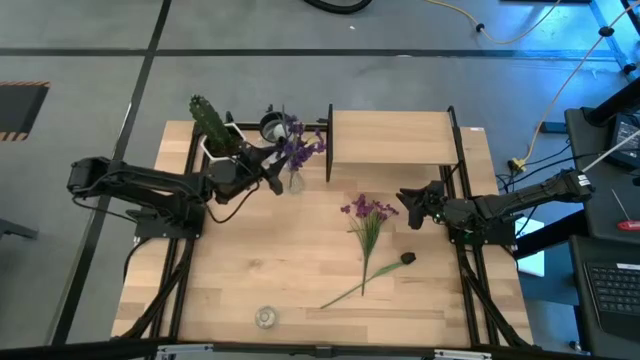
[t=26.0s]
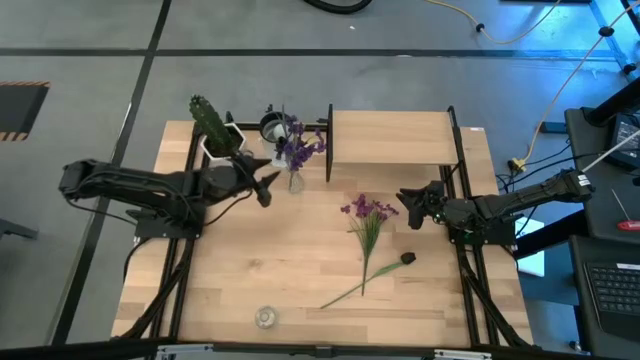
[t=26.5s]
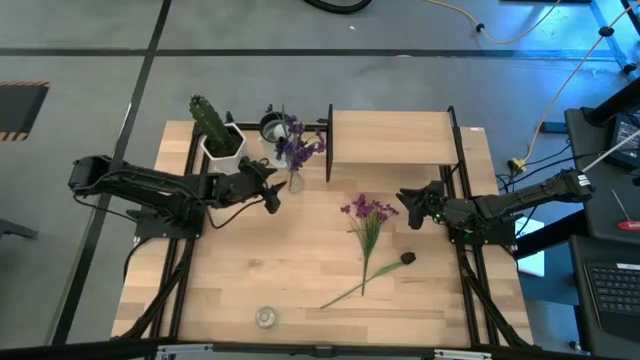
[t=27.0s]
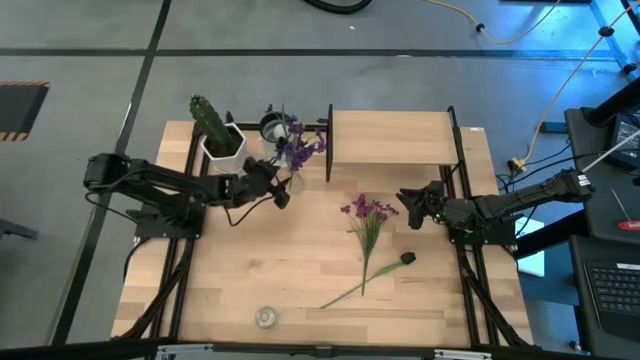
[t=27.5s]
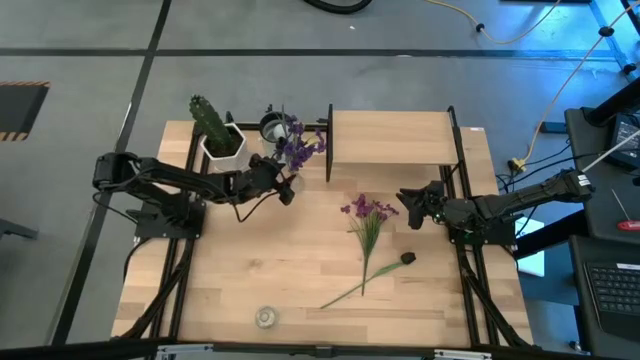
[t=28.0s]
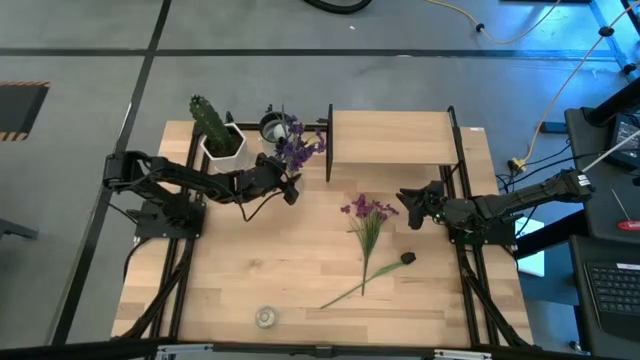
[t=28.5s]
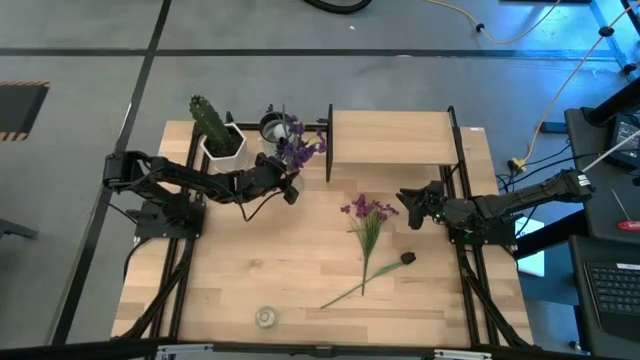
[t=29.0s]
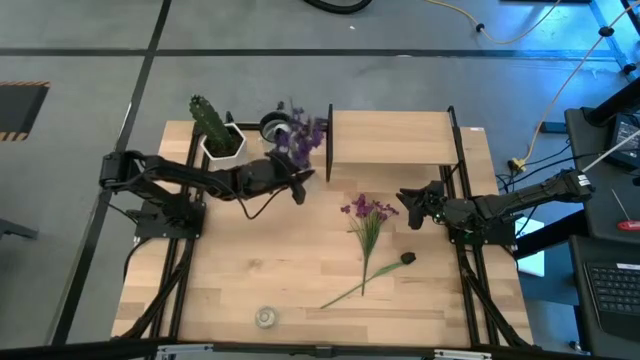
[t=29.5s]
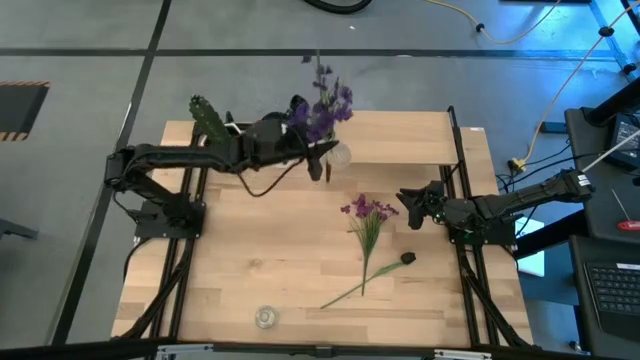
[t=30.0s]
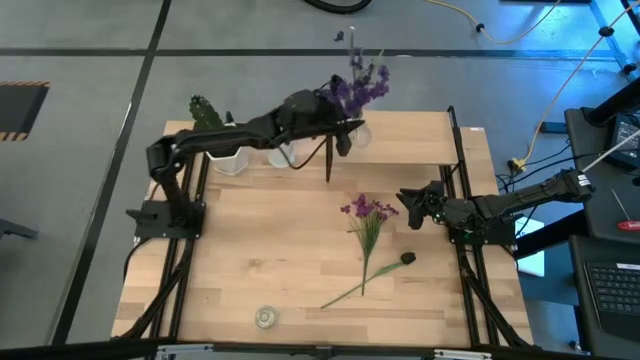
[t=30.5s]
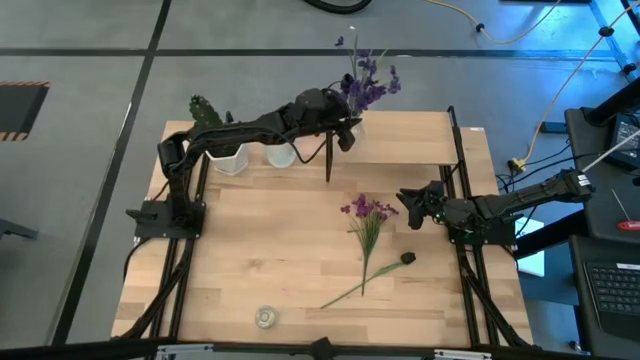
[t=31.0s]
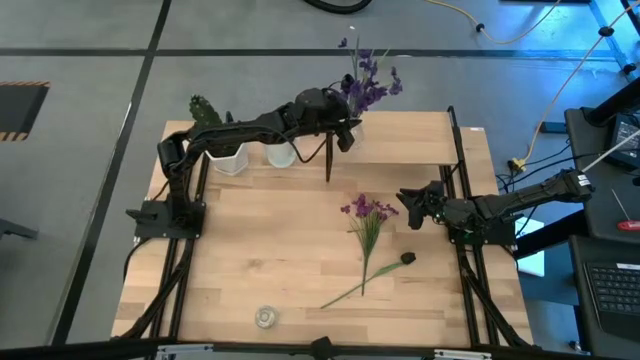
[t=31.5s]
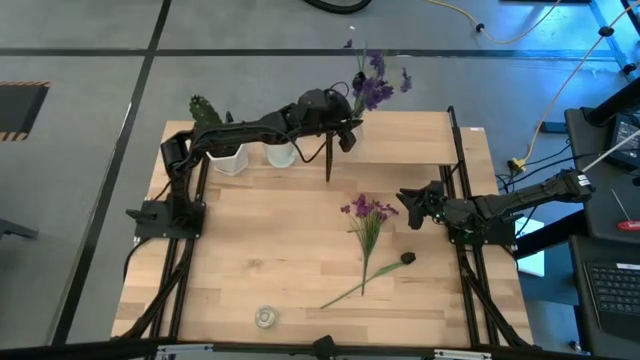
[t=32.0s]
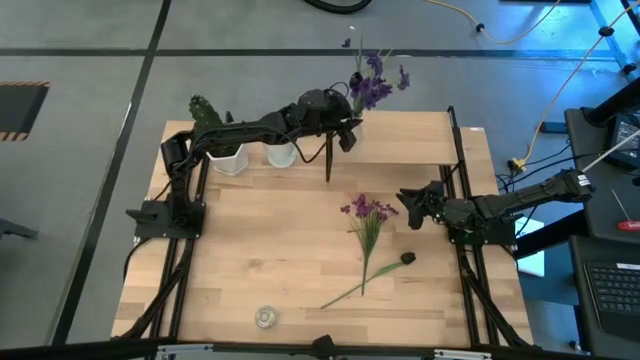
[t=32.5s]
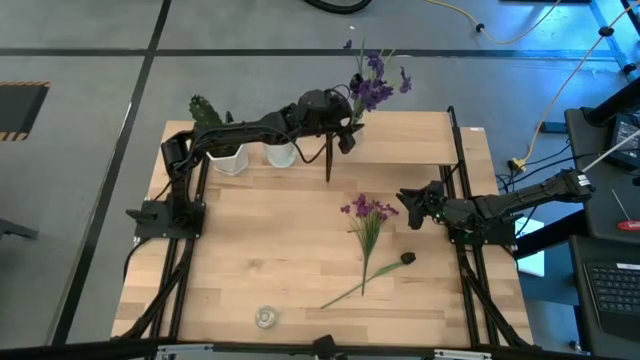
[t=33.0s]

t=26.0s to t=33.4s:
Task: Pick and place flowers into a vace then onto a shelf
Put the top transparent vase with the flowers on the shelf

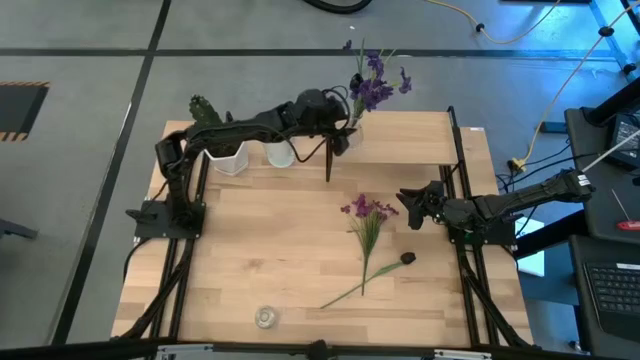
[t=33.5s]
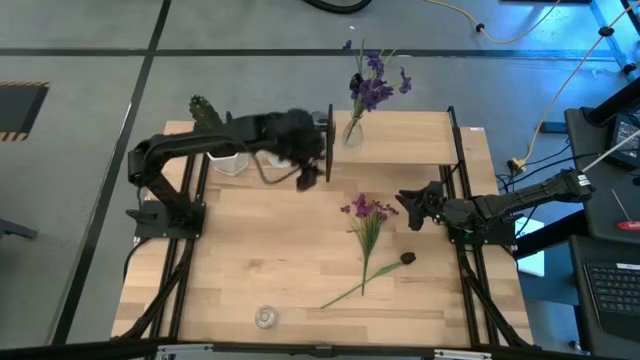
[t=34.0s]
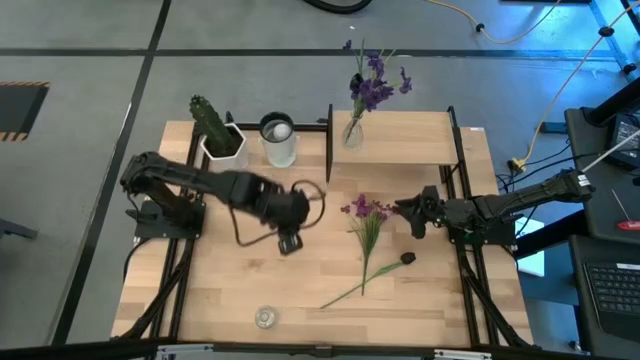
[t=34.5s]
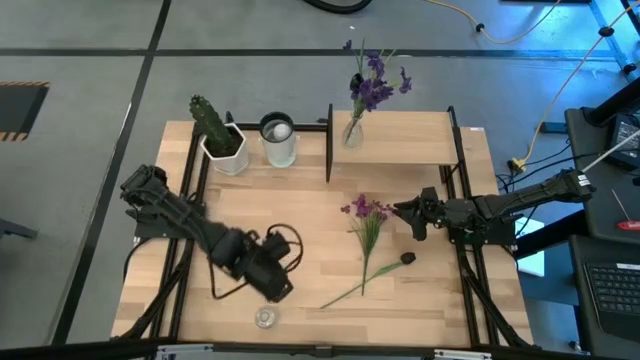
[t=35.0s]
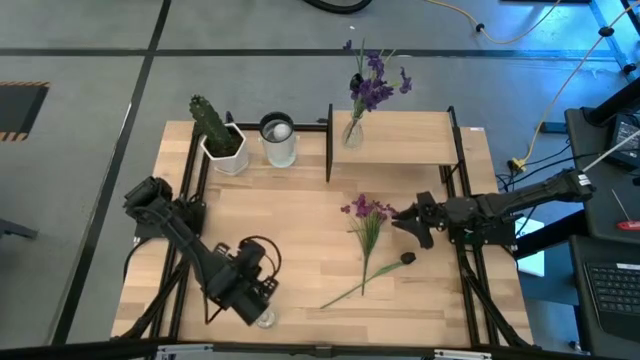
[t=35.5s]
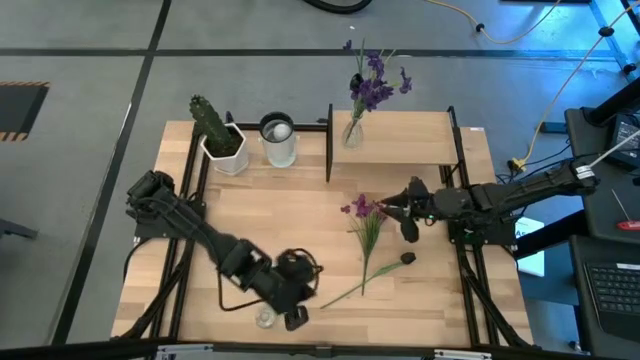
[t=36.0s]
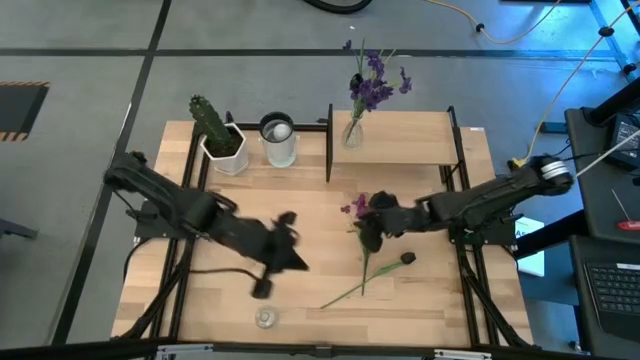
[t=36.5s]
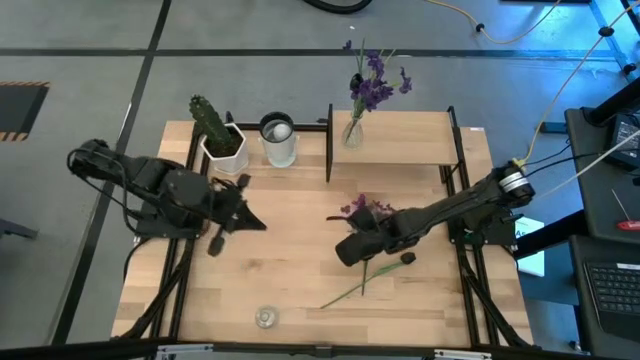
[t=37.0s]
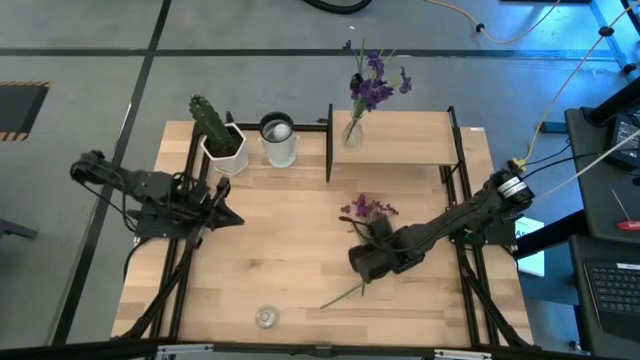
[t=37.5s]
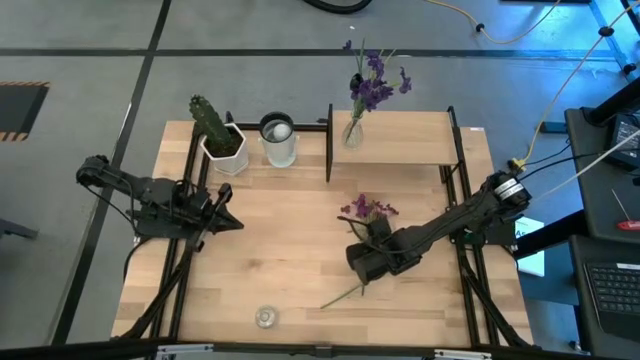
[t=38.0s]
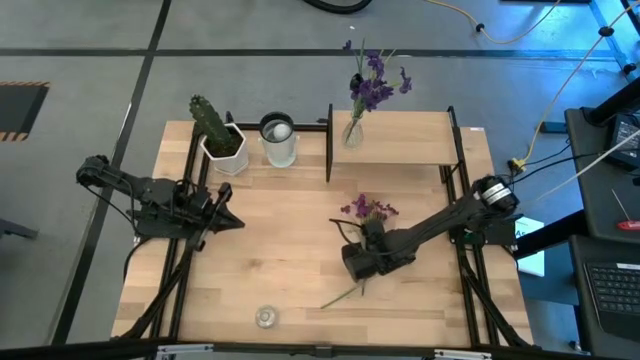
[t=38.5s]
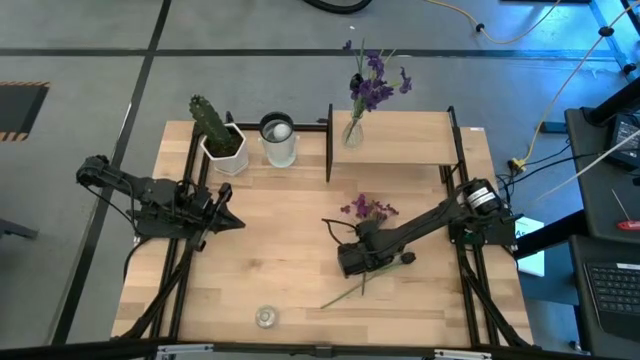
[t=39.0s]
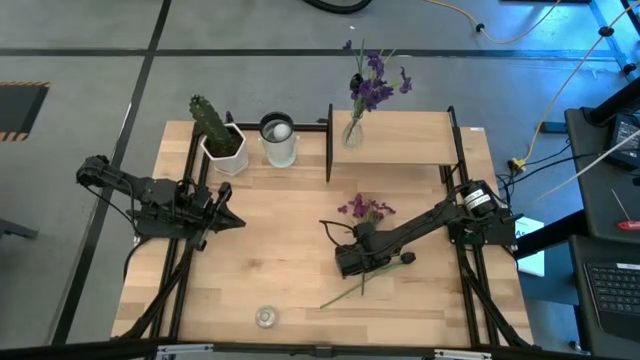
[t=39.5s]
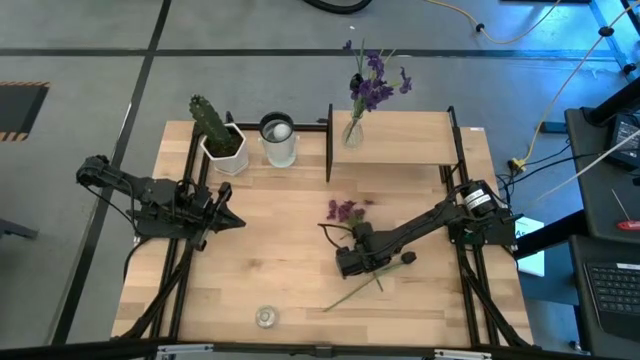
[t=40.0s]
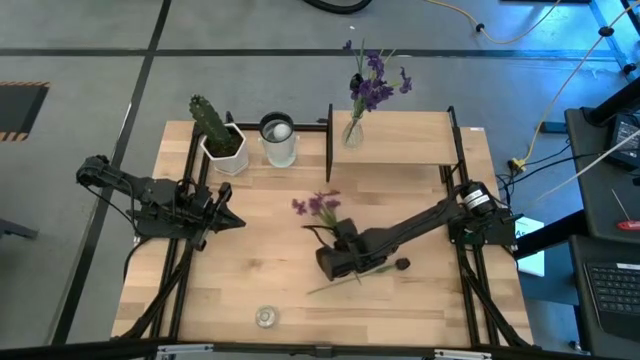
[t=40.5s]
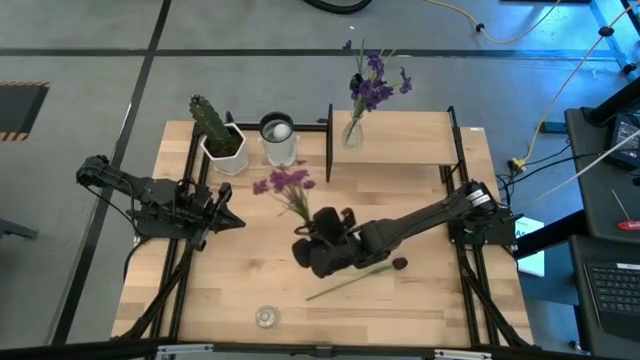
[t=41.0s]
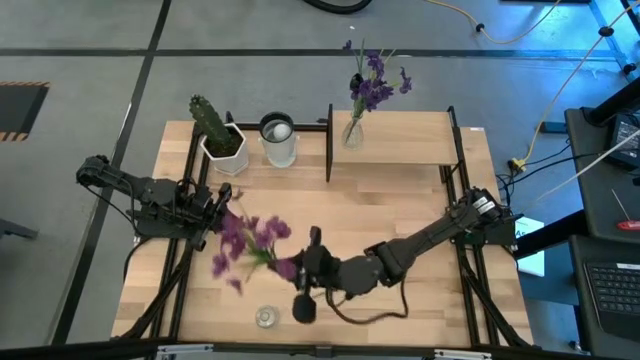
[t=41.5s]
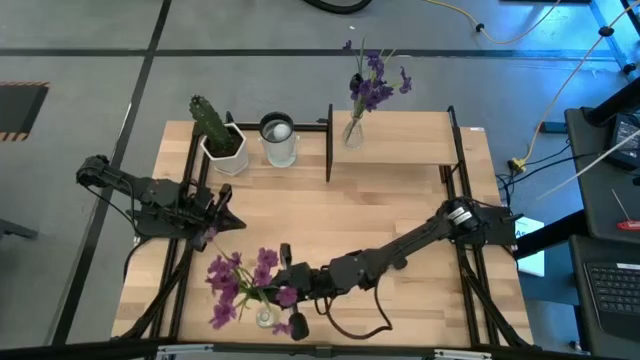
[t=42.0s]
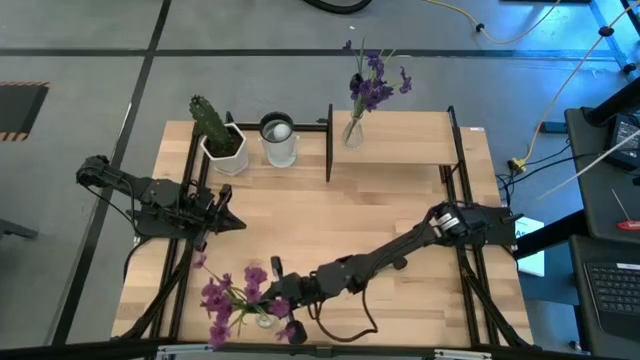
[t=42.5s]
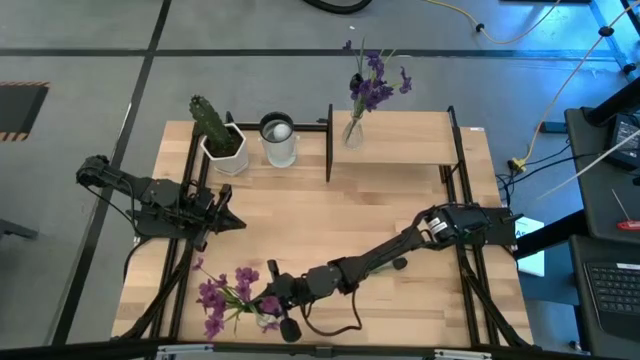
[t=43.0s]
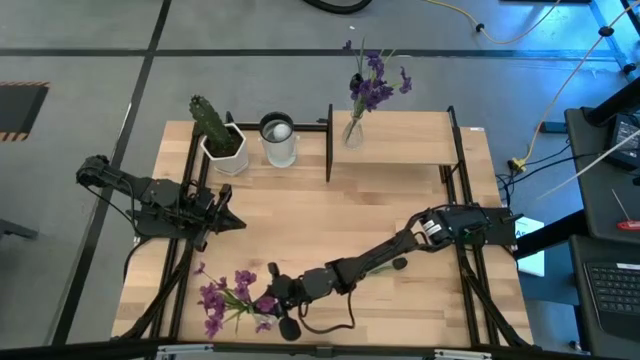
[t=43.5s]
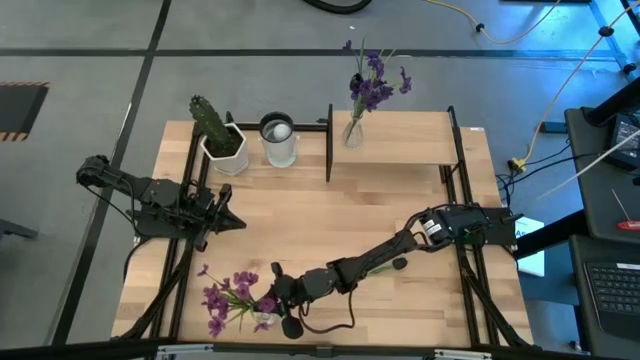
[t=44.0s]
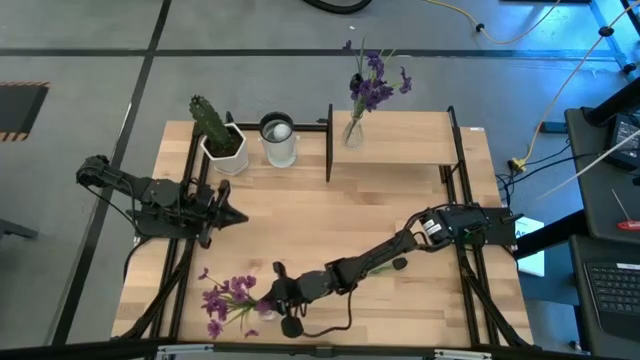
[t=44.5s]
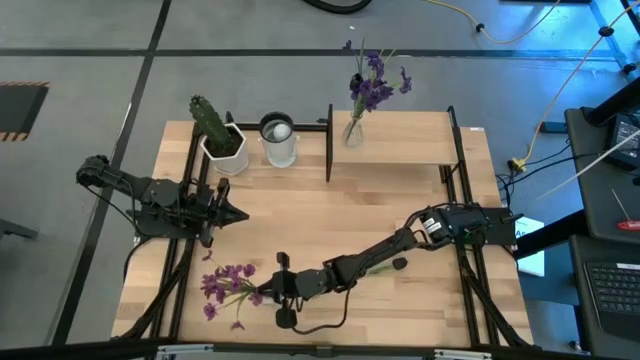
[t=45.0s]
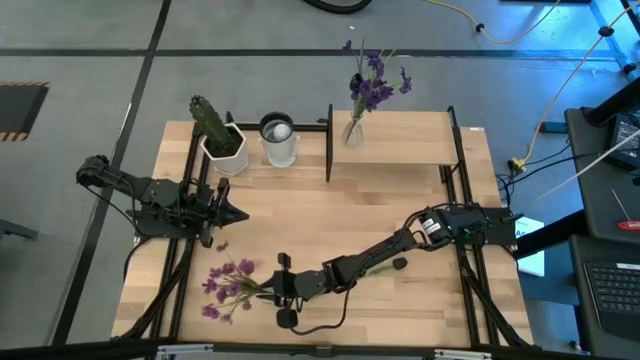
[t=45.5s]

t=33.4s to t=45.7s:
Put the purple flowers into the transparent vase

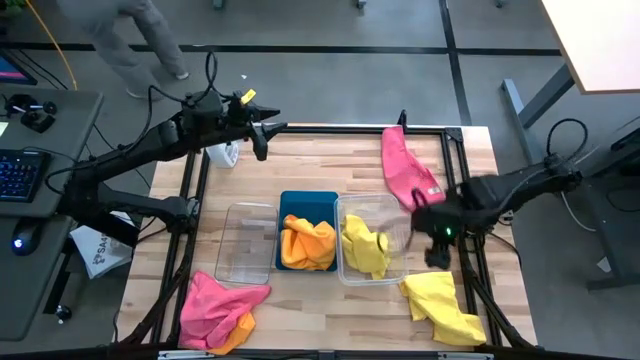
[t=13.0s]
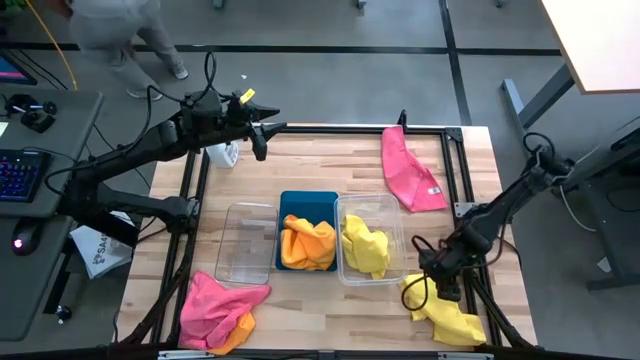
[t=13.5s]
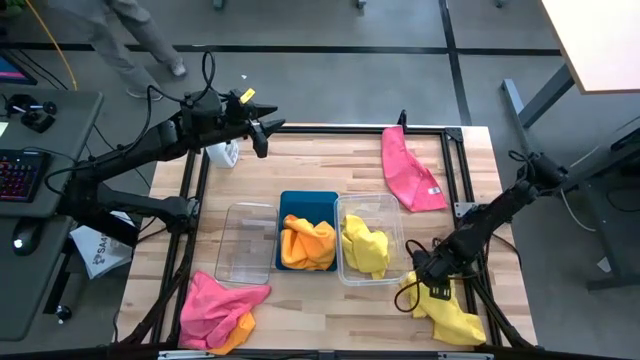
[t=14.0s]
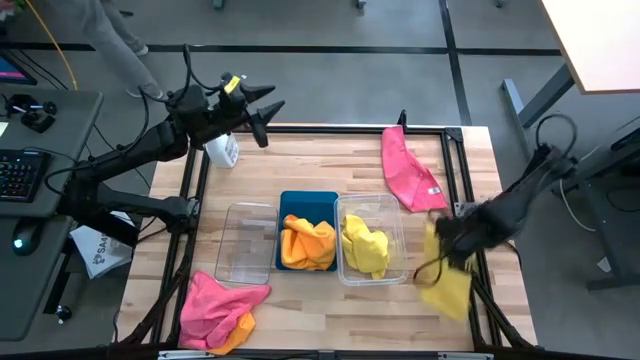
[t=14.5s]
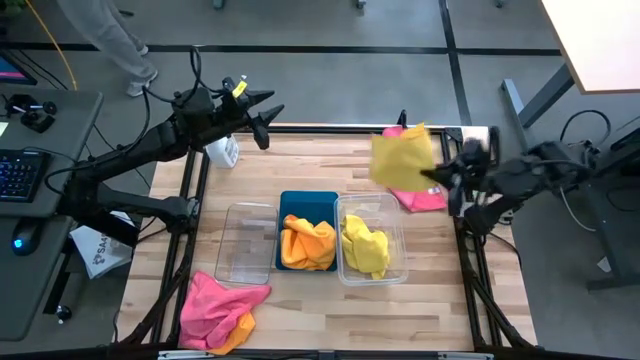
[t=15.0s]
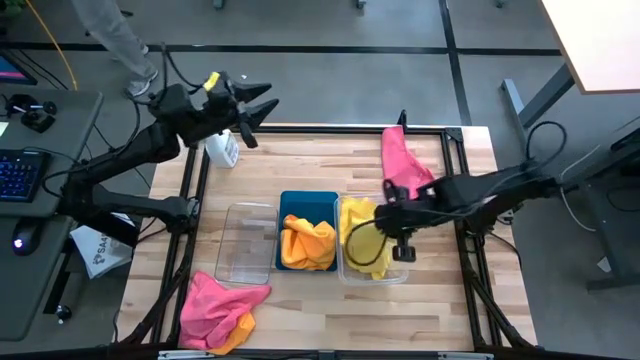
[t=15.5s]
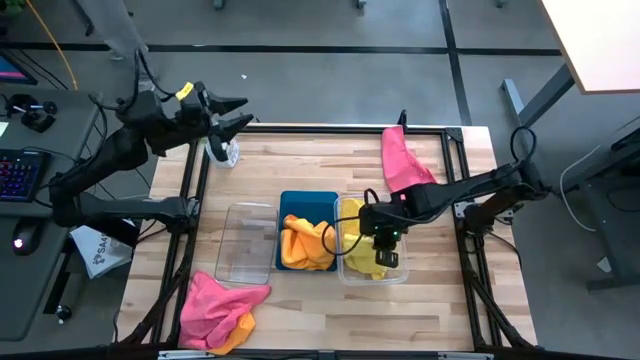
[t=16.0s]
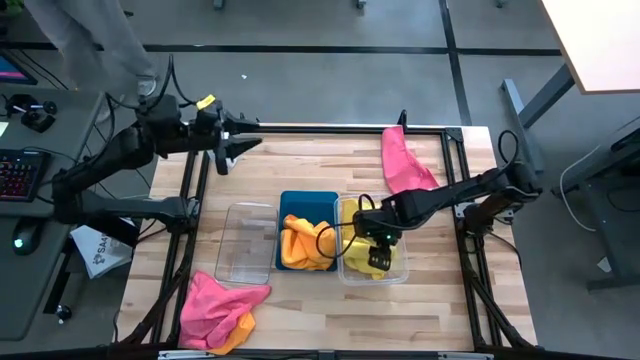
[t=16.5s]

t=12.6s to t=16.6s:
Task: Sort microfiber towel by color & place in baskets
Put the yellow microfiber towel into the right transparent bin
